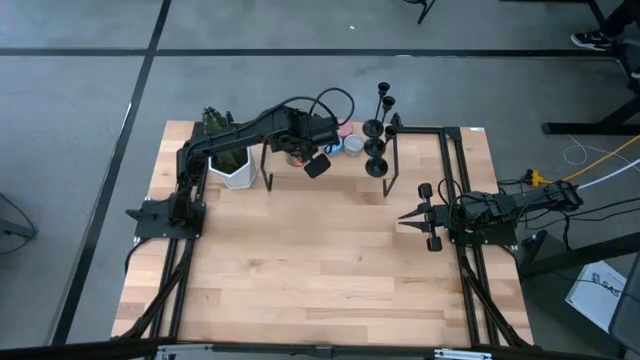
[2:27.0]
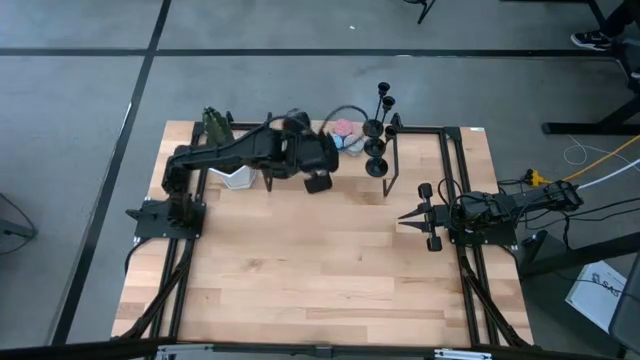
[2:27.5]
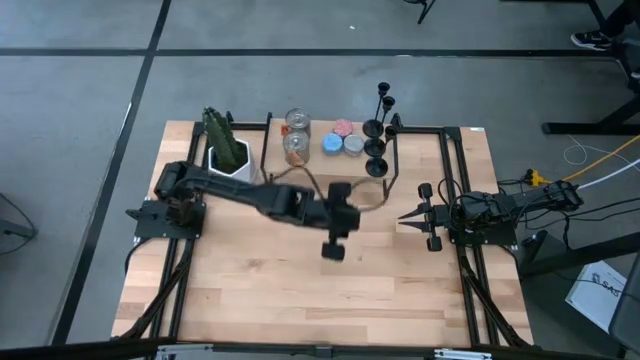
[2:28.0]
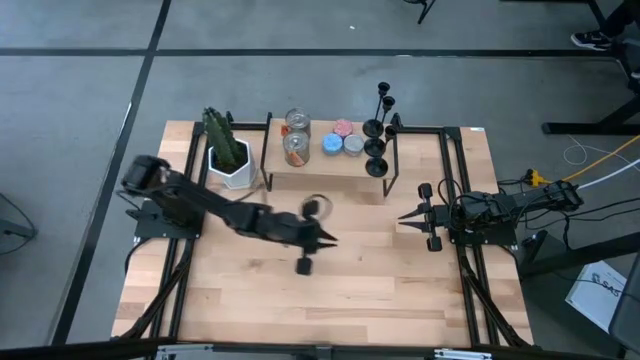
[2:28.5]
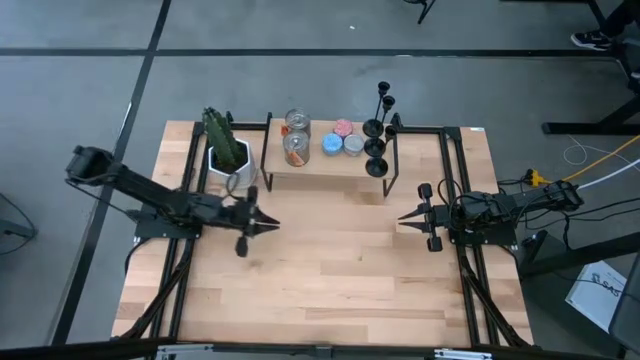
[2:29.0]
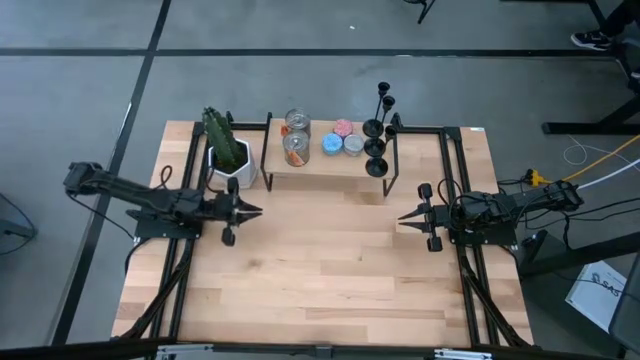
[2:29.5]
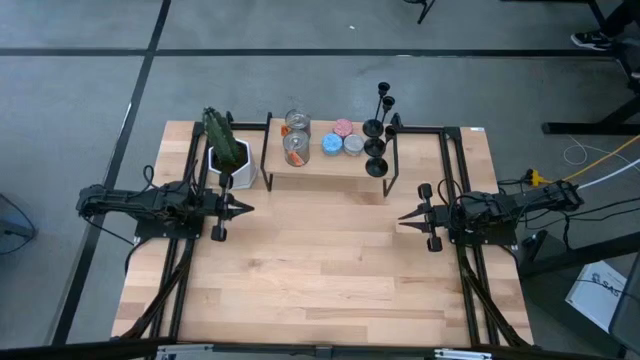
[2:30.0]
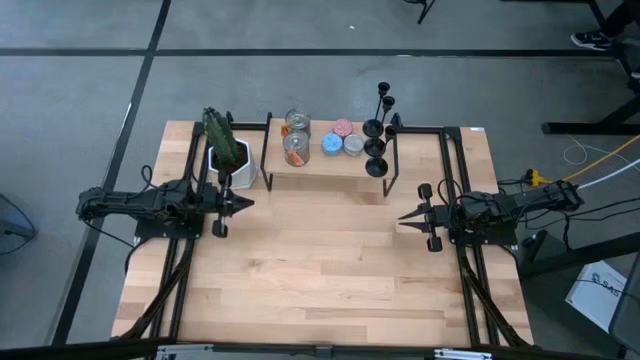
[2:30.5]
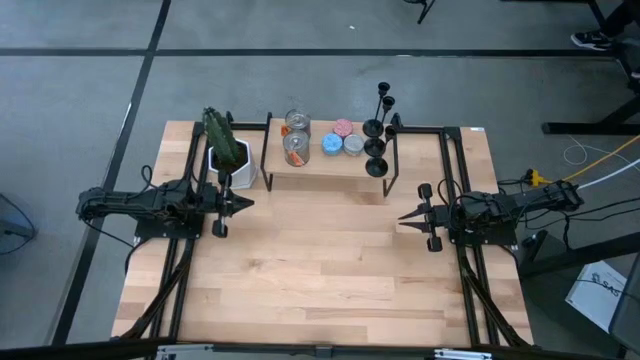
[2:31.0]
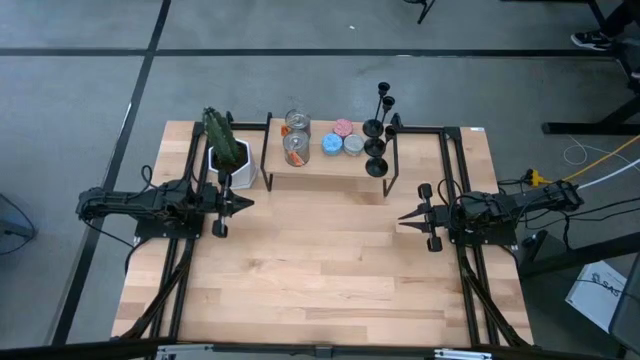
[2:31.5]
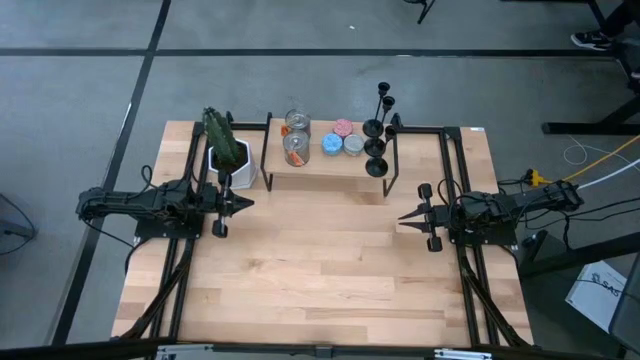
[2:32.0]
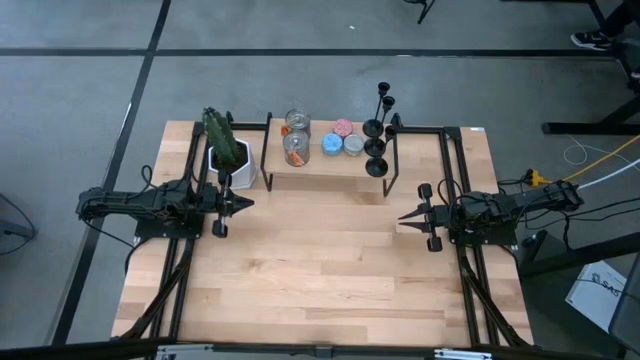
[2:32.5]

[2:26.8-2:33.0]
Task: Pick & Place candle stick holders
Return to Home Position

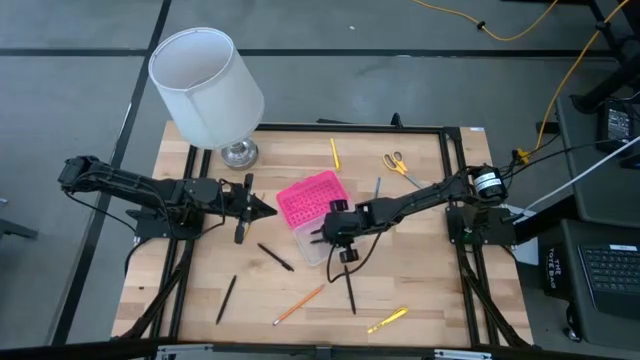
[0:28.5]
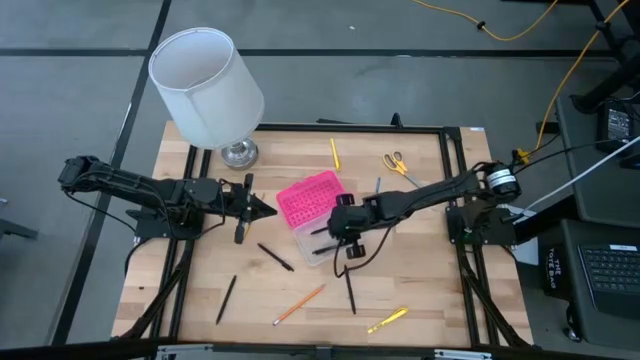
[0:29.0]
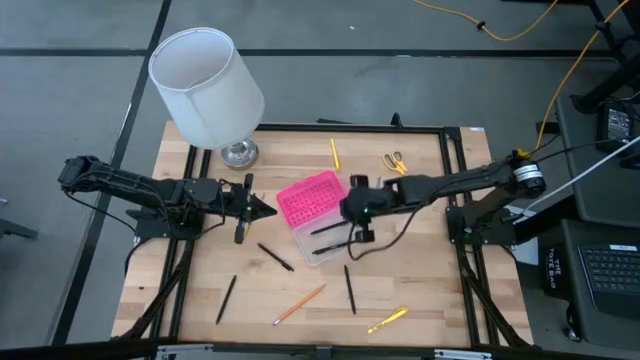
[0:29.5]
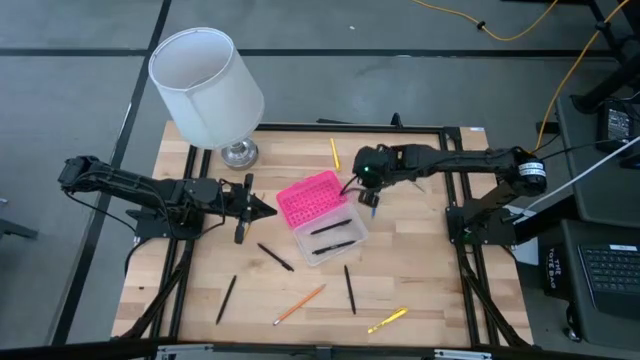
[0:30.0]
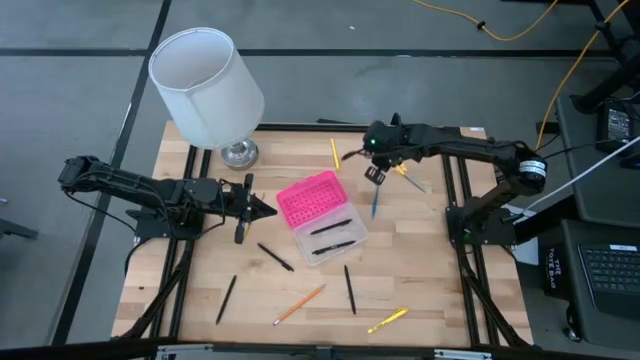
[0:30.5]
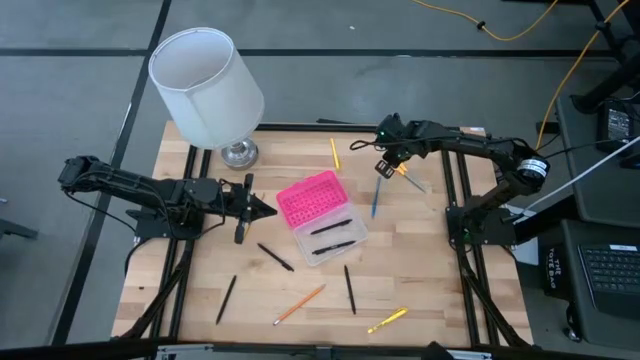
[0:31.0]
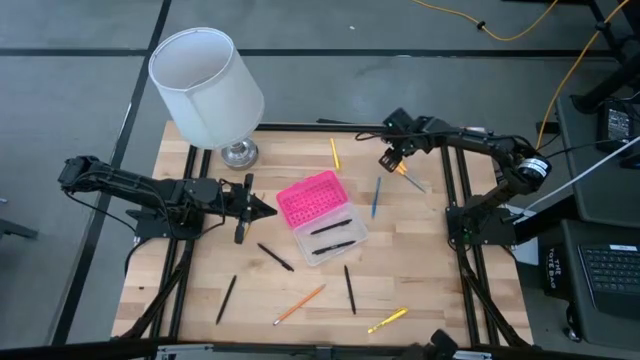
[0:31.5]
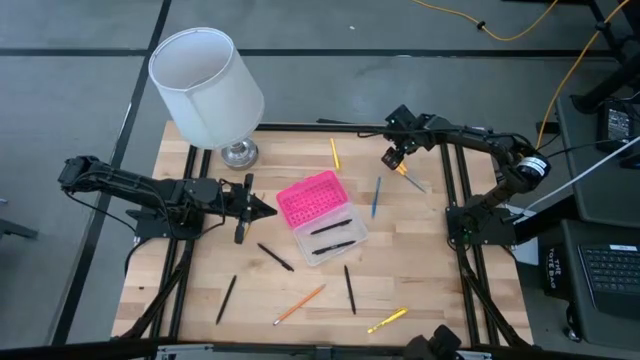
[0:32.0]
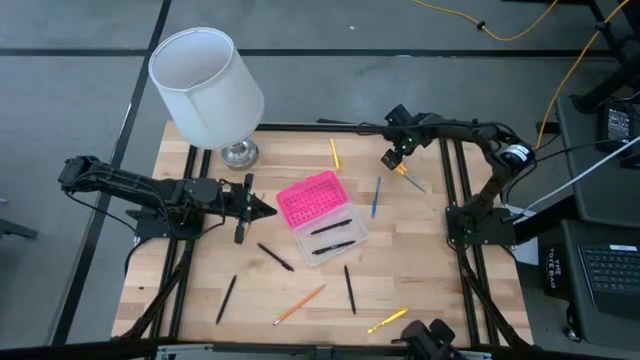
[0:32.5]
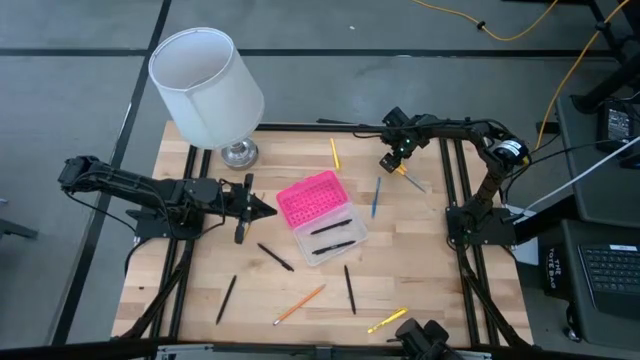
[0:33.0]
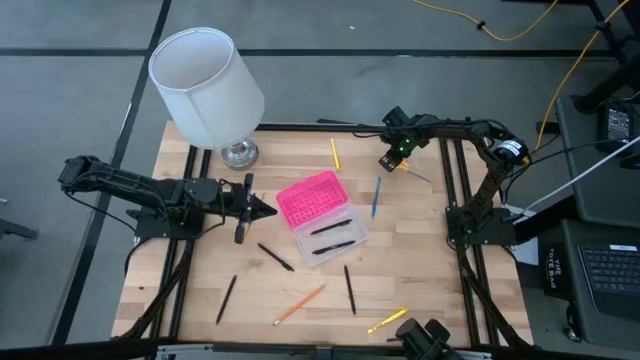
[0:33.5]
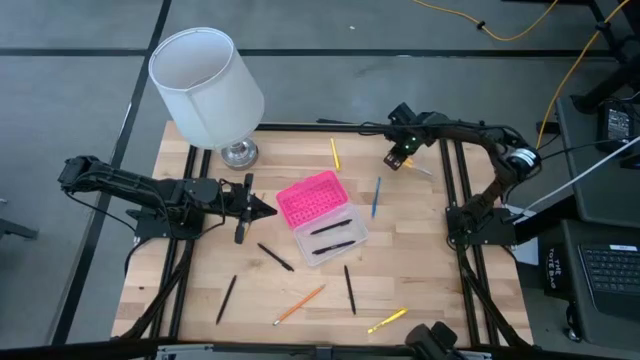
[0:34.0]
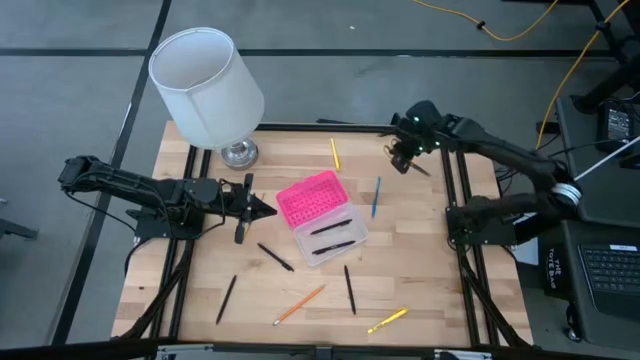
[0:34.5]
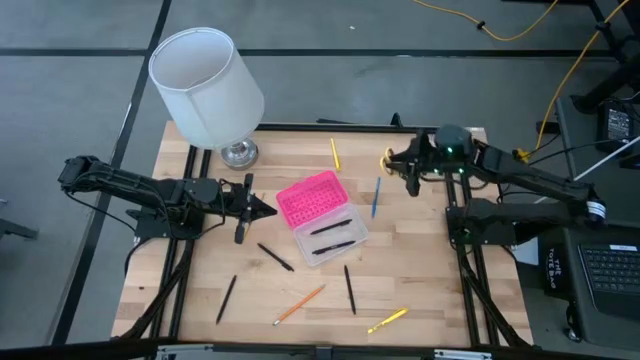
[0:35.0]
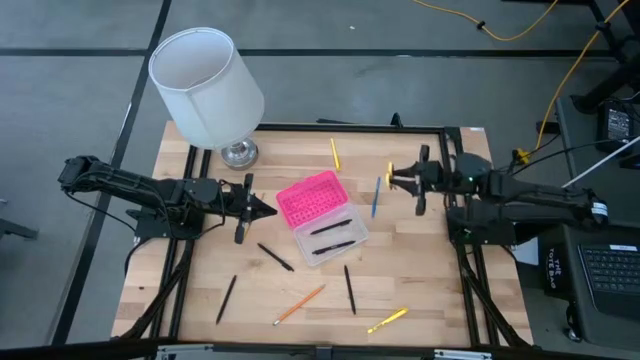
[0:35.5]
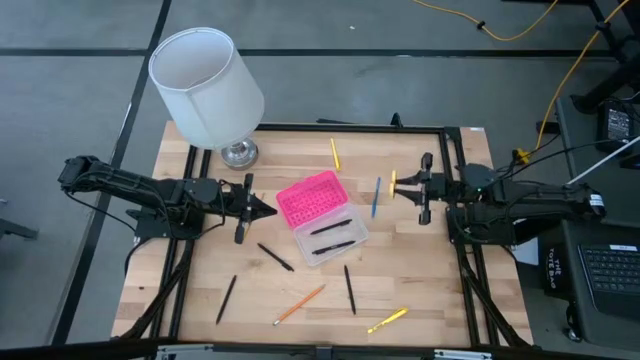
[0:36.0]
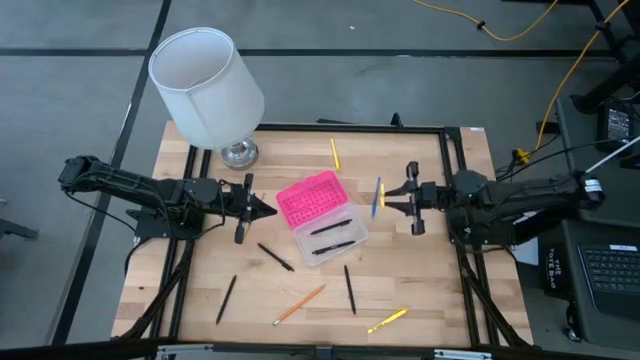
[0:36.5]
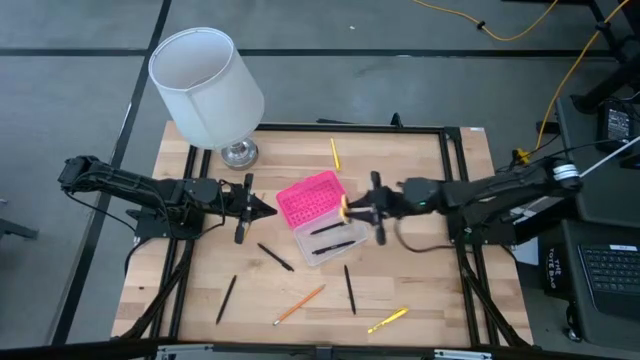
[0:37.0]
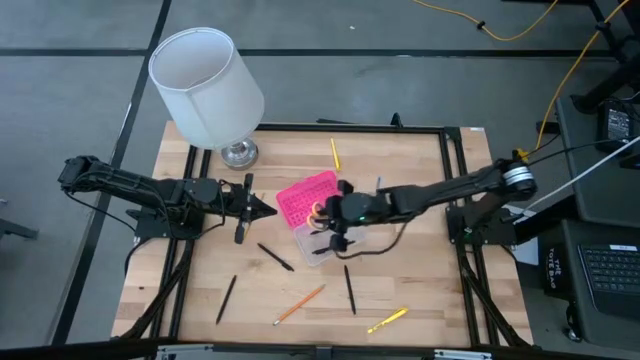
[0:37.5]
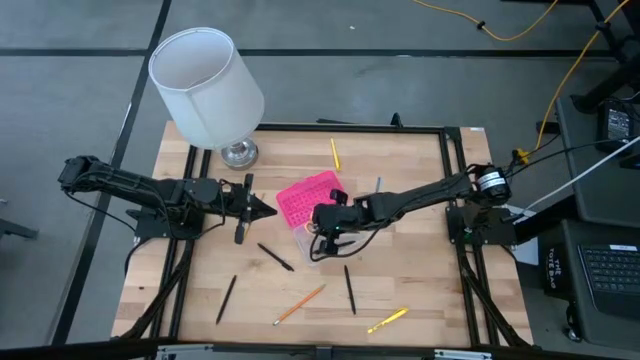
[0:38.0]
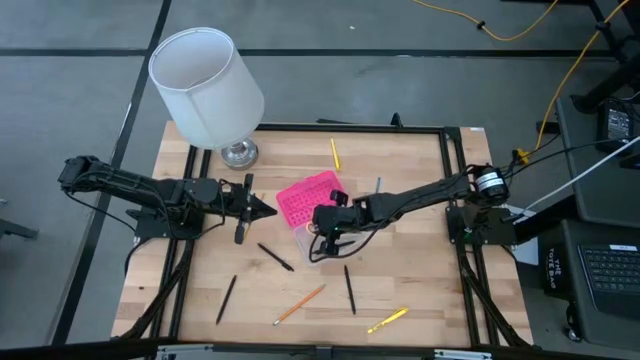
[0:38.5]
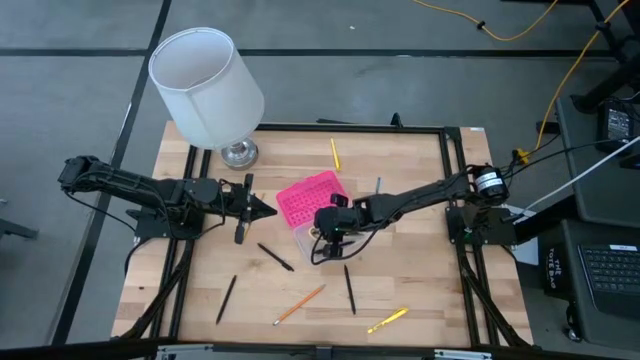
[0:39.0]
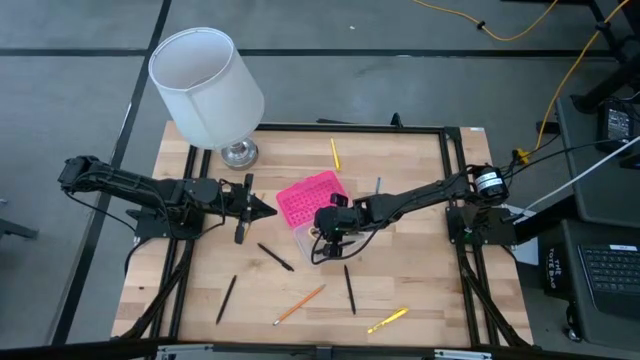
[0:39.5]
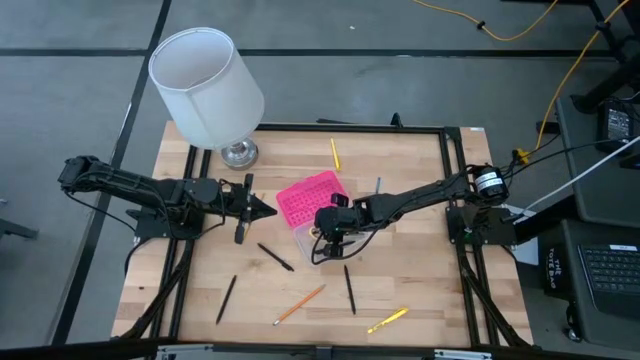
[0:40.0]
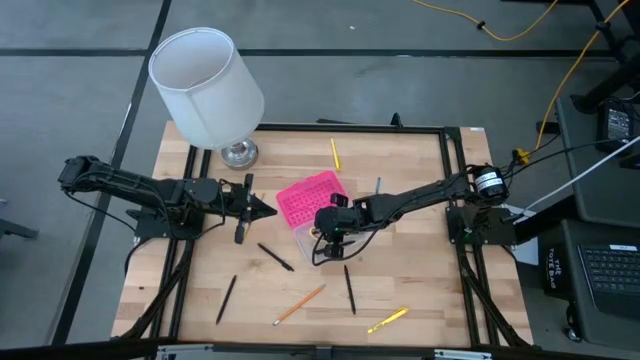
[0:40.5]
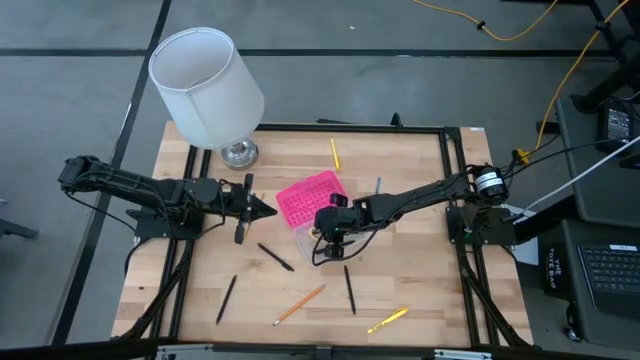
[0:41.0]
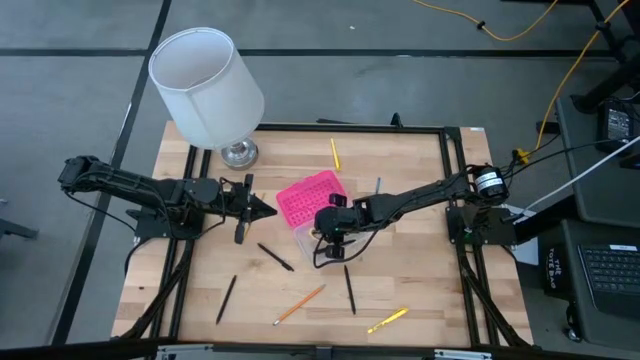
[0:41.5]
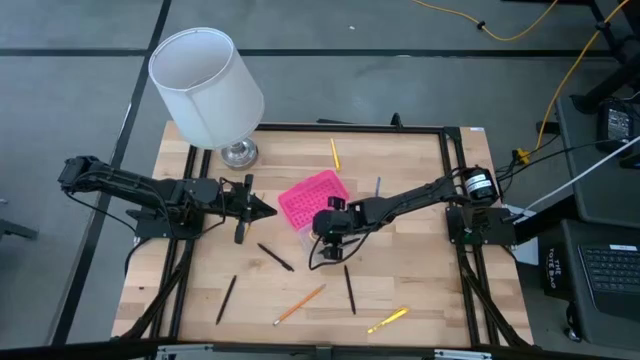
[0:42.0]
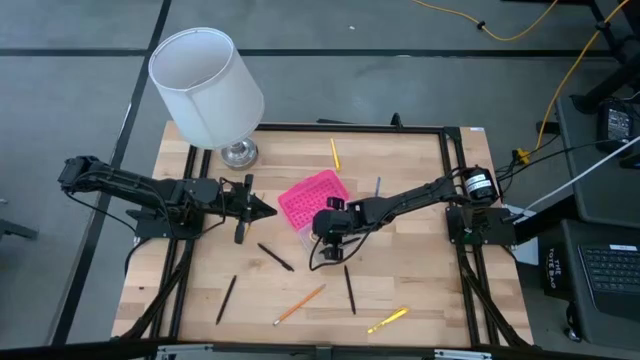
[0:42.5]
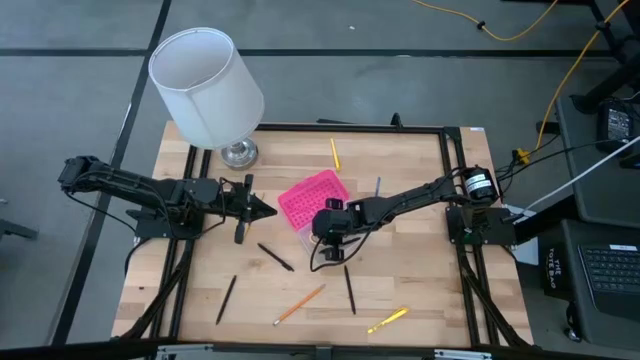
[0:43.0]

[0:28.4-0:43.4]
Task: Pick & place school supplies into a supply box
Put the yellow scissors into the supply box

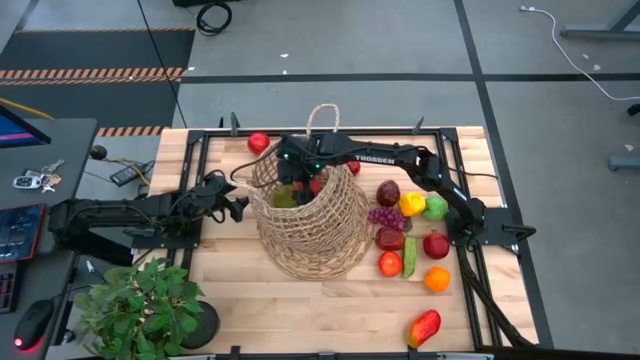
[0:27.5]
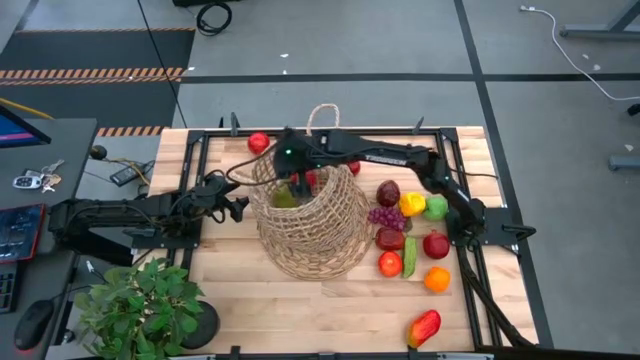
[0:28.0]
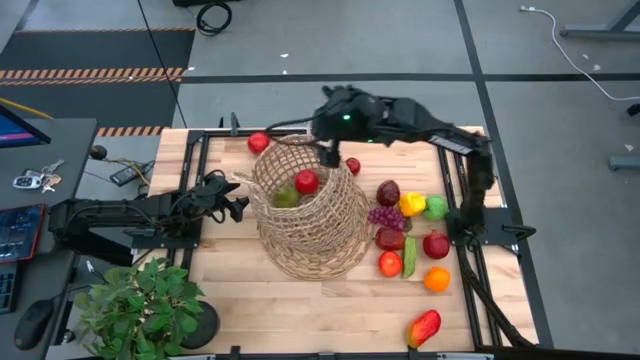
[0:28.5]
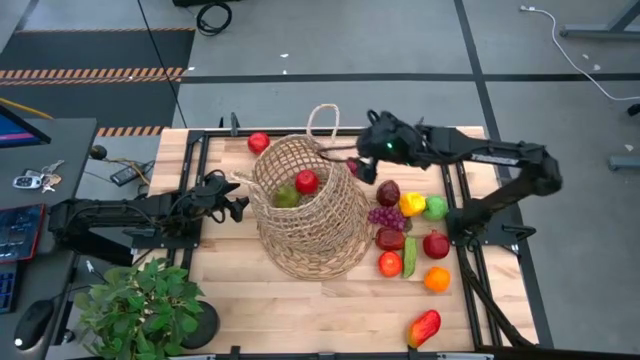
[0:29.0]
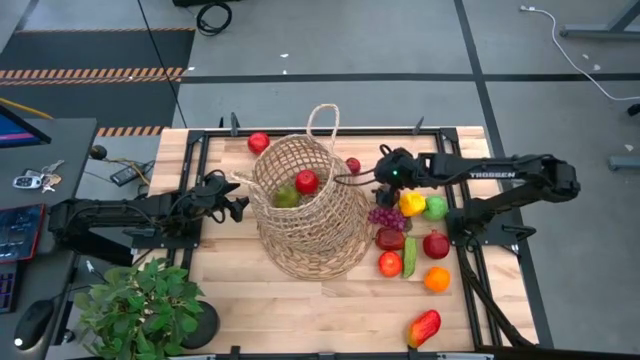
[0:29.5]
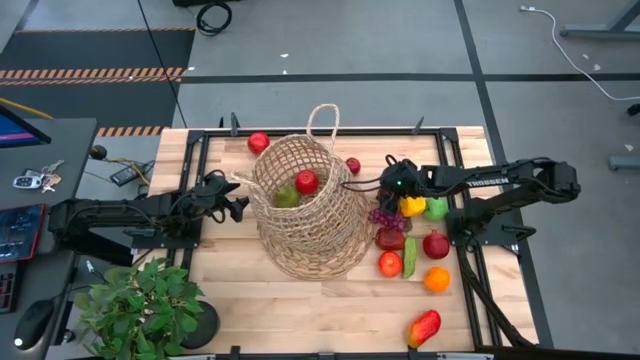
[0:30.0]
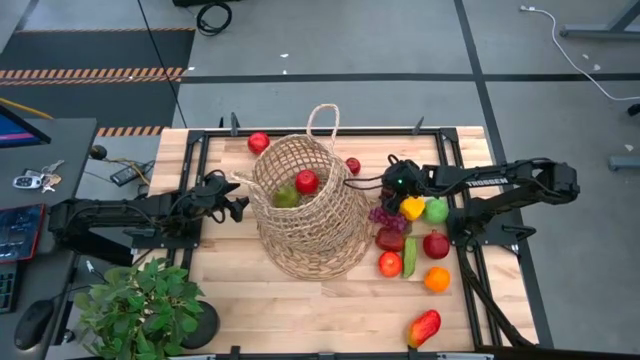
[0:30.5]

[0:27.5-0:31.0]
Task: Build produce basket
Put the middle dark red apple into the basket
